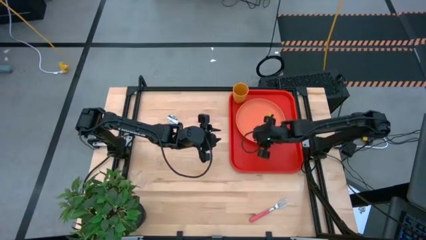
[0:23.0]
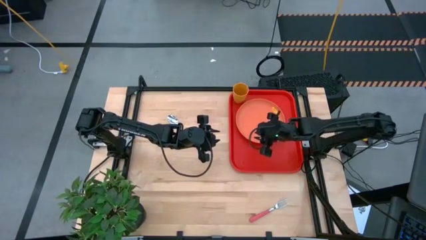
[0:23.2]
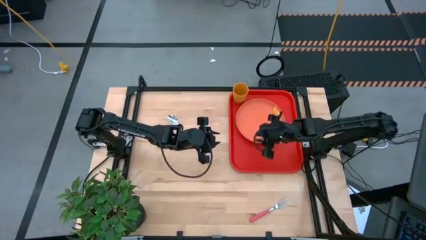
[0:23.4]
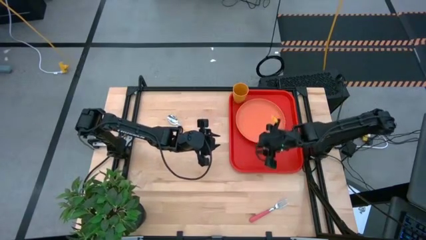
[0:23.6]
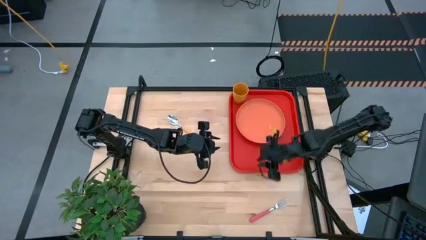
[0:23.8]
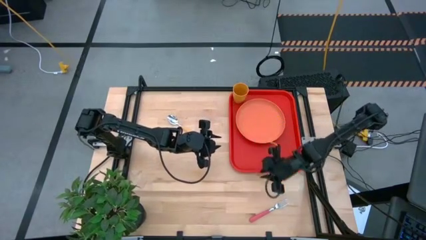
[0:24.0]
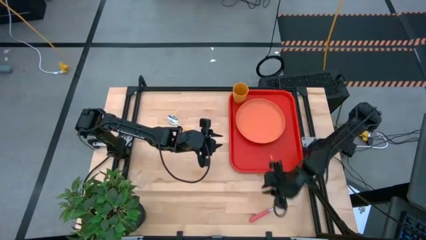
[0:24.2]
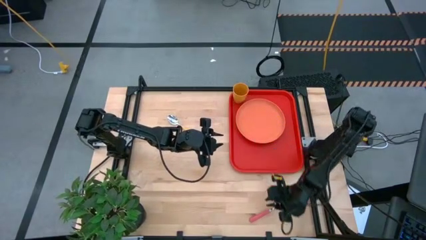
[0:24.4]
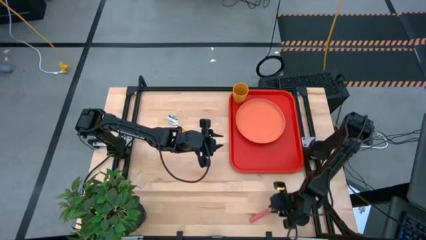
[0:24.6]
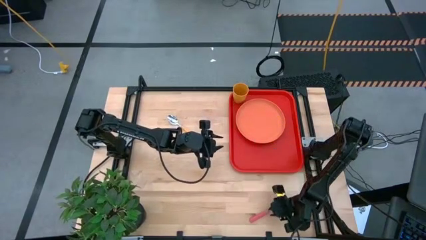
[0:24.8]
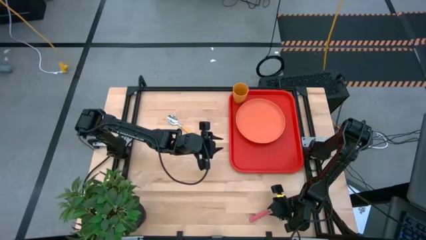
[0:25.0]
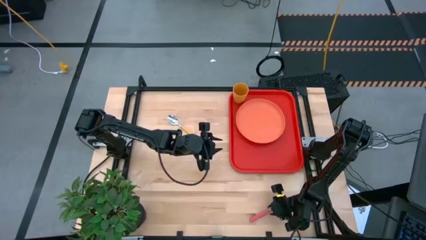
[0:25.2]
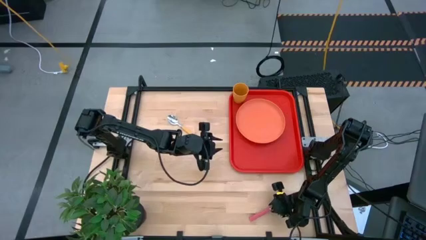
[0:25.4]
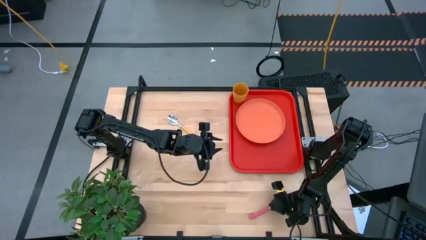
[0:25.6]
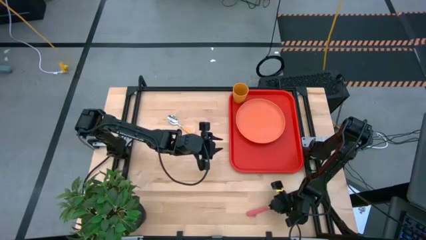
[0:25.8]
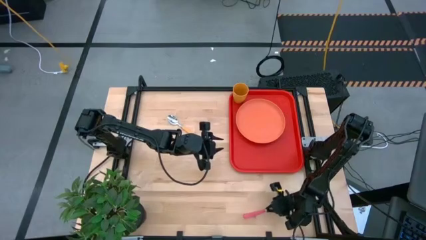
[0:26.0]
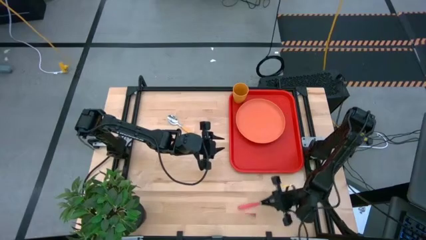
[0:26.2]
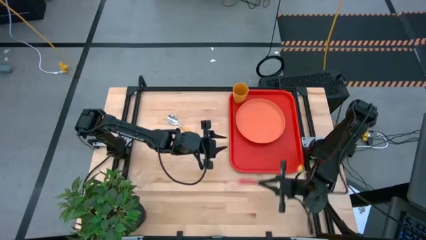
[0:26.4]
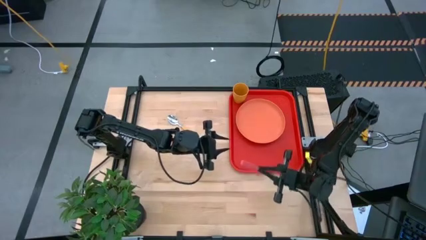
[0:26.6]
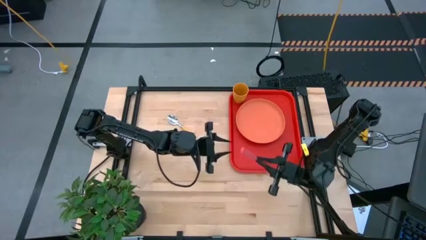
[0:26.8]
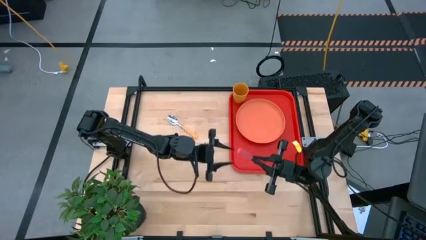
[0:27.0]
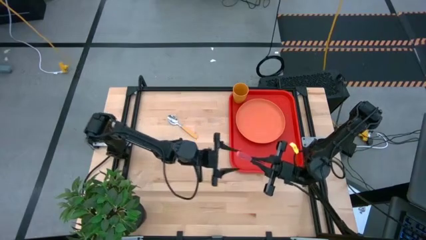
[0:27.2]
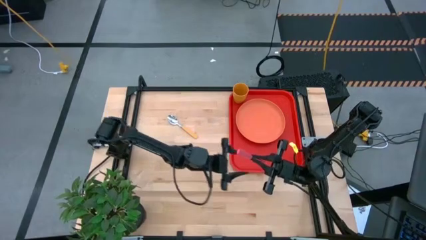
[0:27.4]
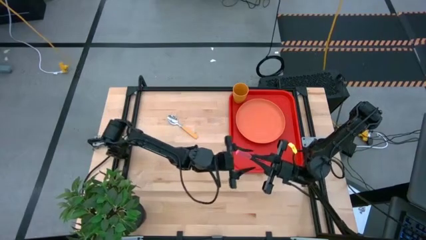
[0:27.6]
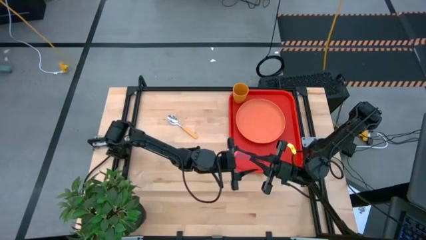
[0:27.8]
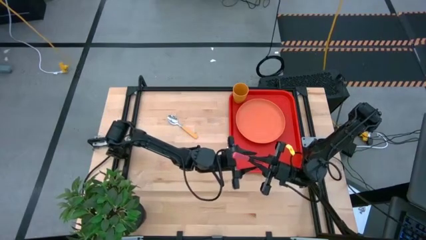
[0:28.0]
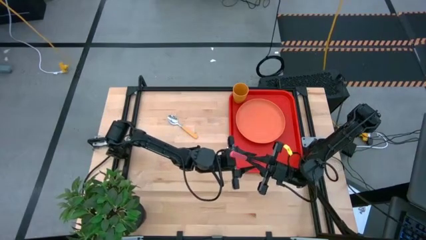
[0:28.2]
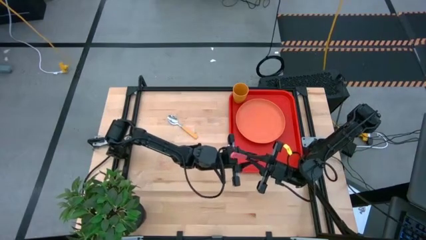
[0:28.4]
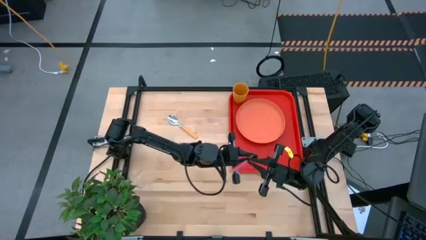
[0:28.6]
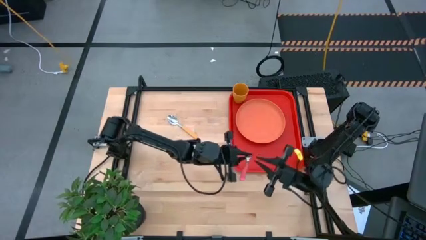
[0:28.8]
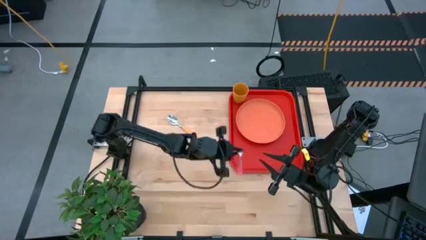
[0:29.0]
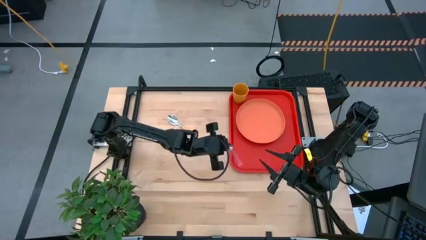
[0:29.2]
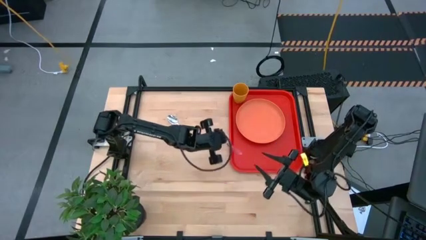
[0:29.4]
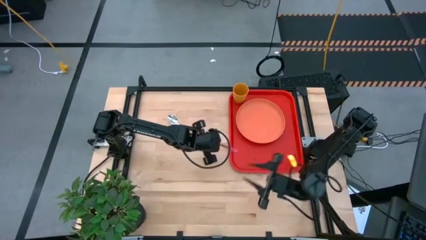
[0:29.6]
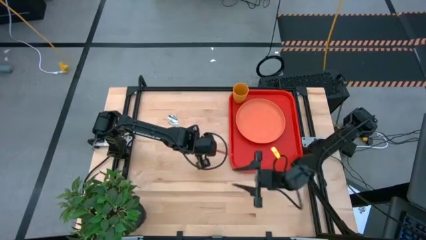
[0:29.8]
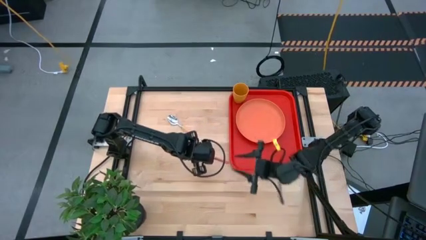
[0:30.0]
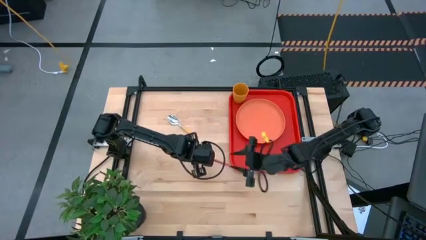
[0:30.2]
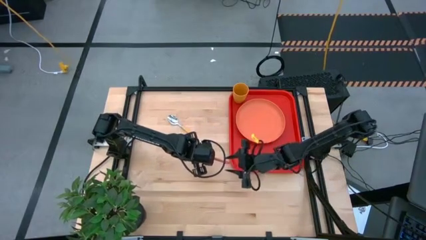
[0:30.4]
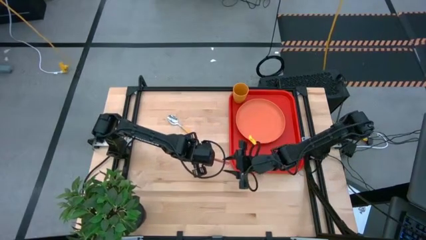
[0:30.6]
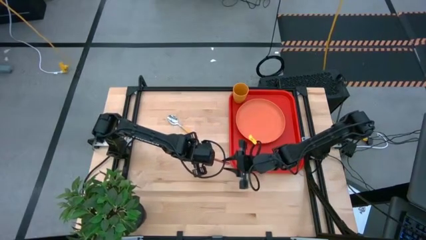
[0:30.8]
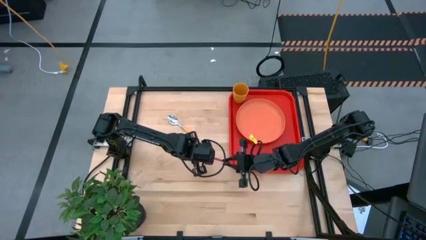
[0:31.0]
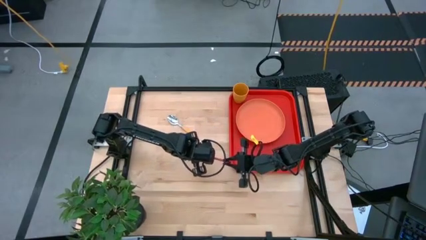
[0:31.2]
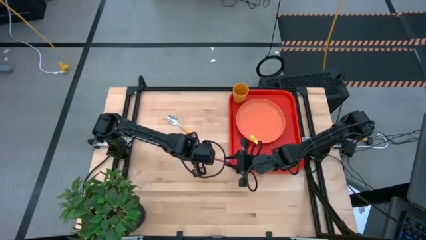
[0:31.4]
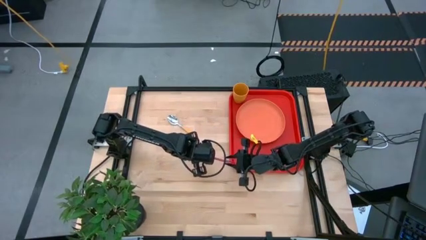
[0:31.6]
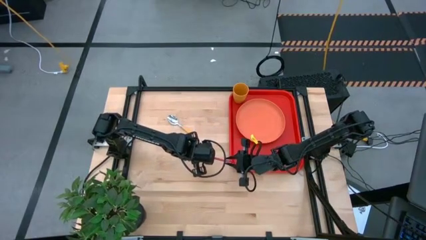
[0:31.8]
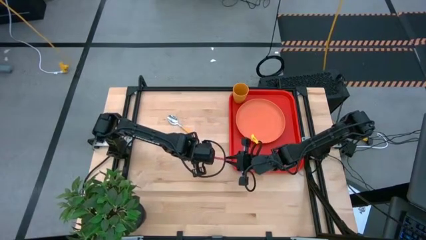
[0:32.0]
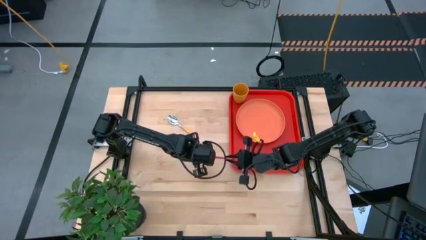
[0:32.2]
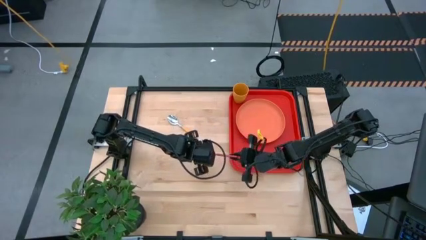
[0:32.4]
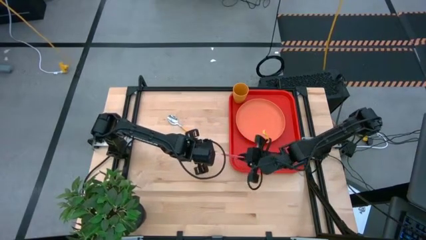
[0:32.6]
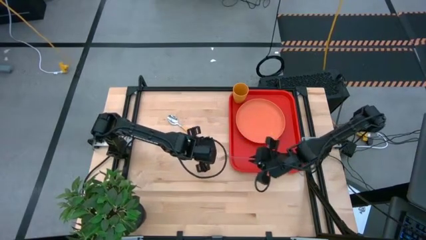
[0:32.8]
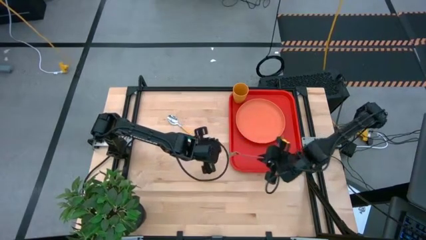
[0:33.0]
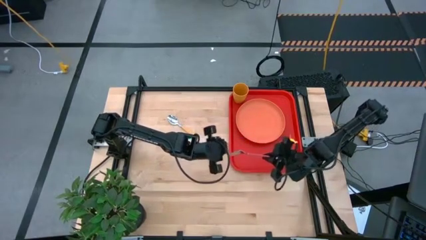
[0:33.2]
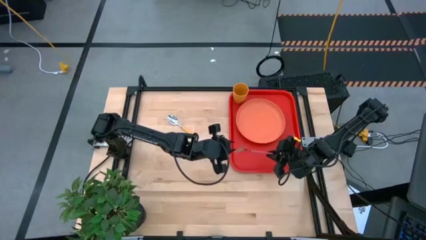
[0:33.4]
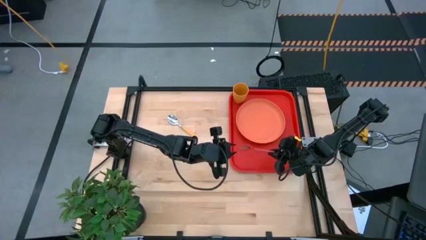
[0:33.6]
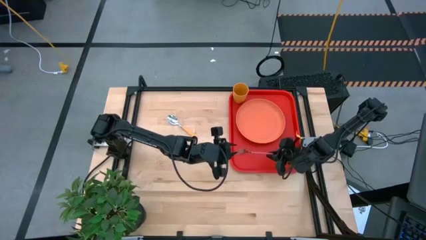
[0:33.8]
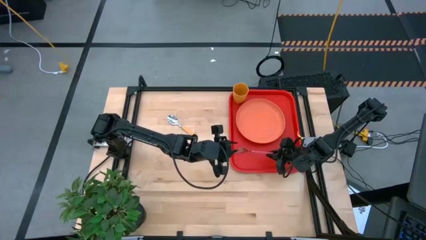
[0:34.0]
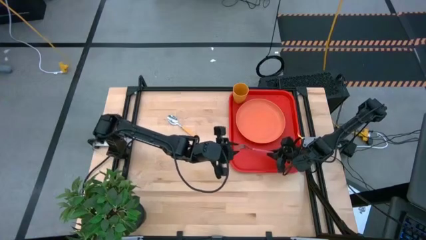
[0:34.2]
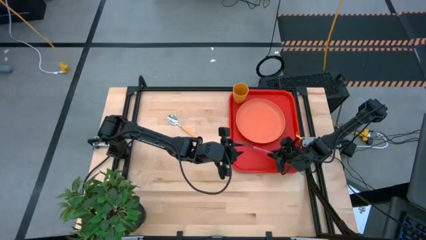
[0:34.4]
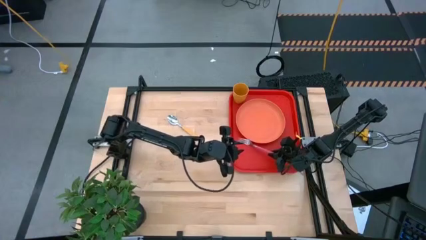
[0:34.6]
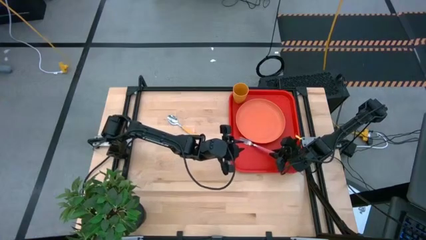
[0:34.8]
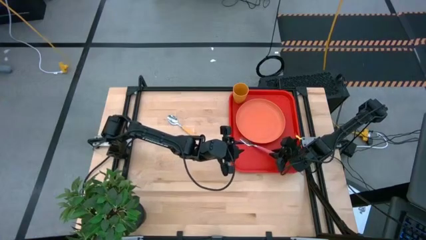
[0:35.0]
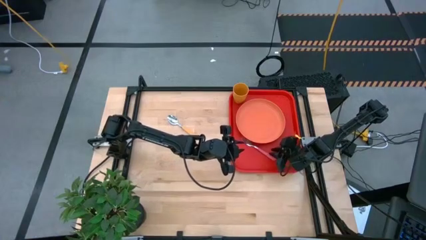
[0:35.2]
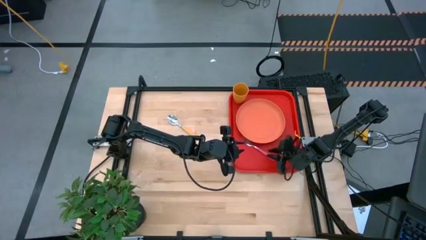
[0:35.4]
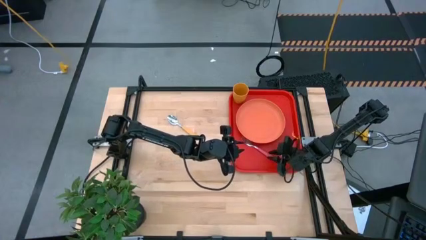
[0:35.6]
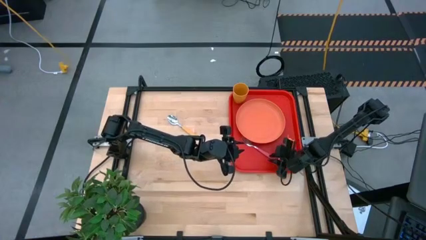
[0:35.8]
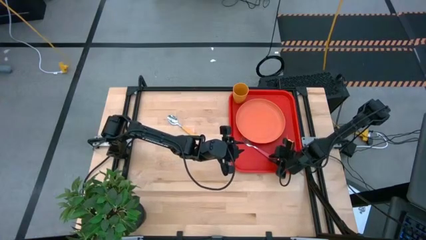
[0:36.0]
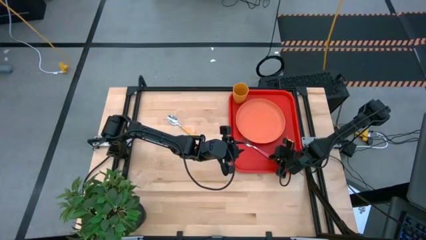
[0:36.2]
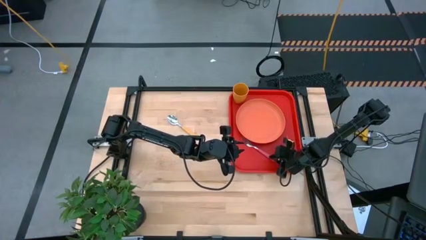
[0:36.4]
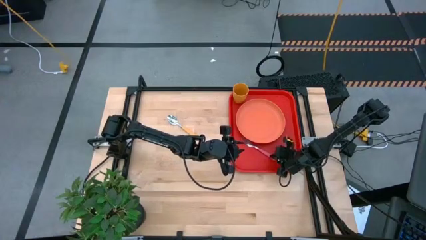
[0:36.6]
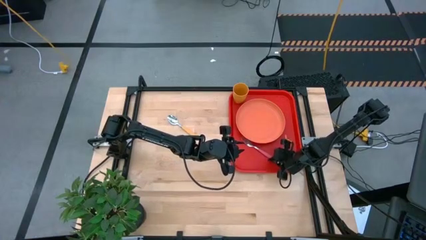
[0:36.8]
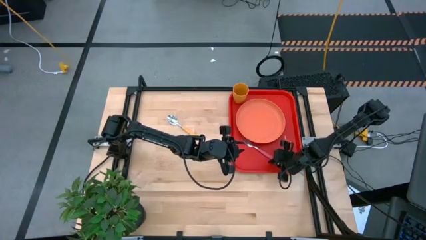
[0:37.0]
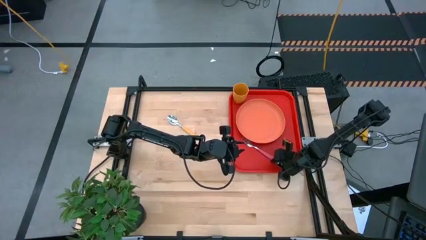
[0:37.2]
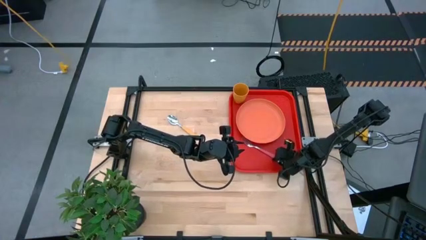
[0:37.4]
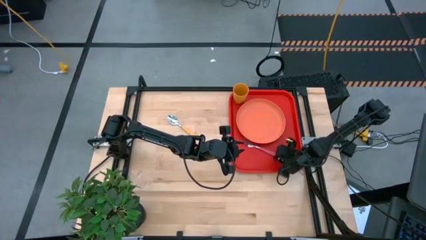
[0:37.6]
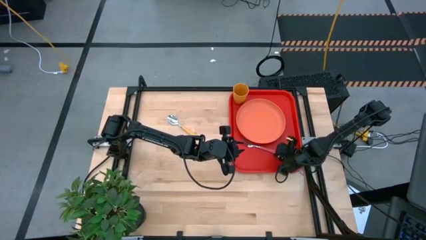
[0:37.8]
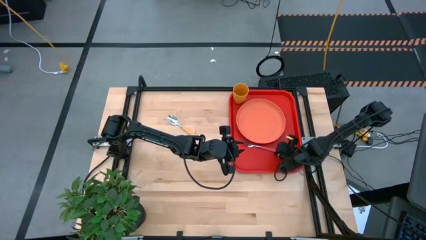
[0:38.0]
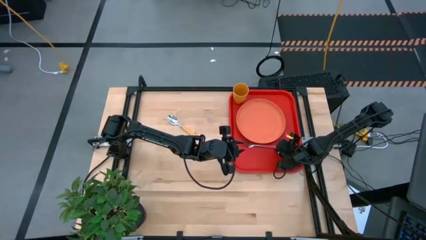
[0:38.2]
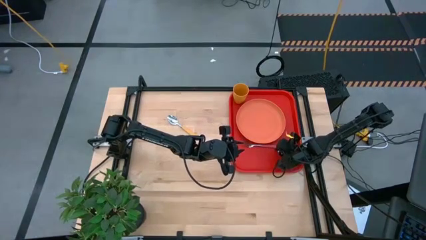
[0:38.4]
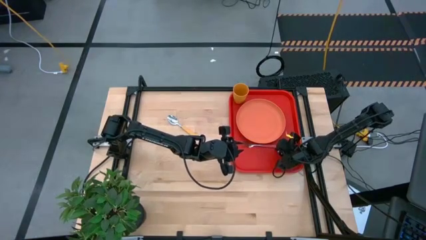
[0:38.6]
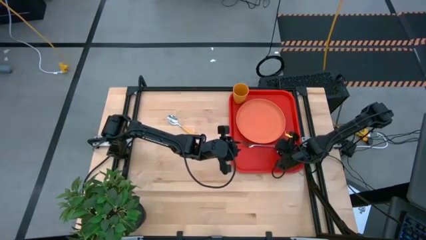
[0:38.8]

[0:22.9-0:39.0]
Task: Pick and place plate/cup/fork/spoon on tray
Put the pink fork on the red table tray to the bottom of the orange plate

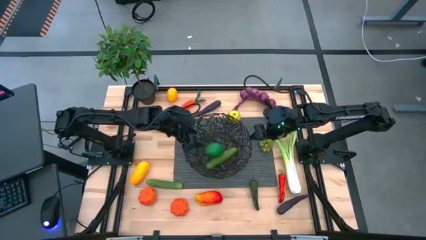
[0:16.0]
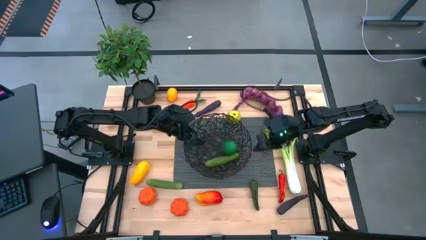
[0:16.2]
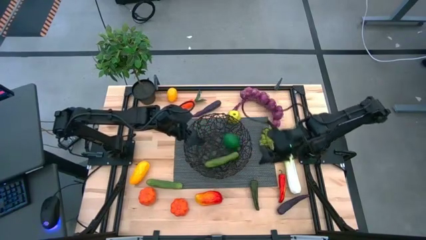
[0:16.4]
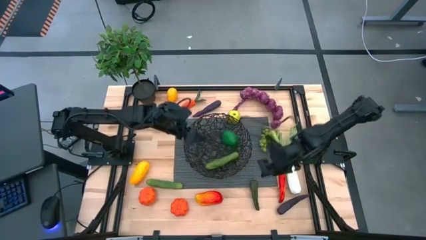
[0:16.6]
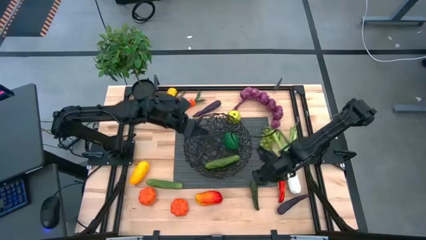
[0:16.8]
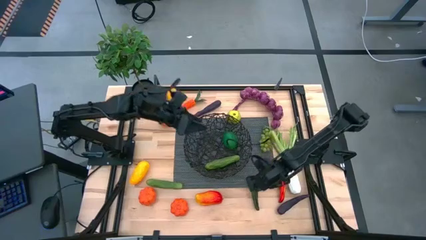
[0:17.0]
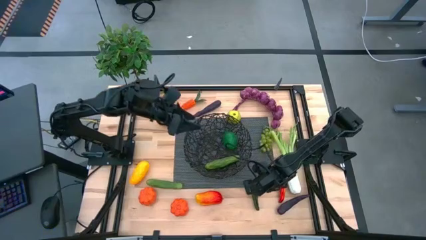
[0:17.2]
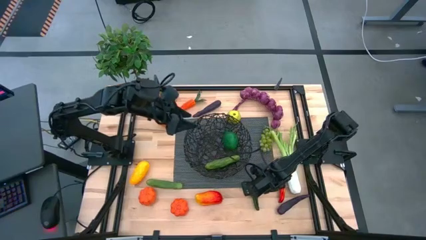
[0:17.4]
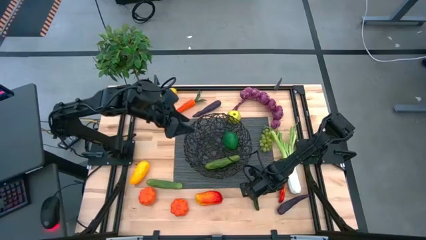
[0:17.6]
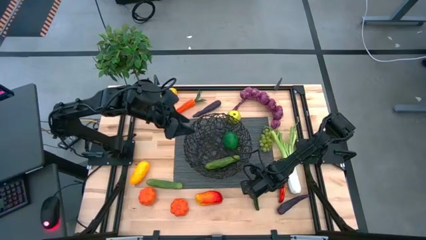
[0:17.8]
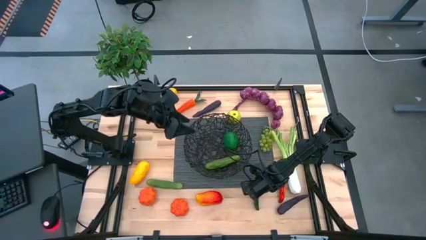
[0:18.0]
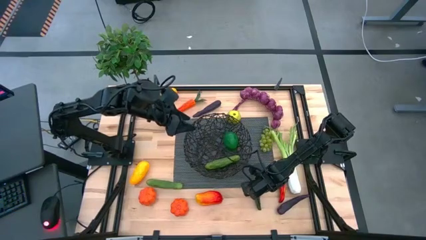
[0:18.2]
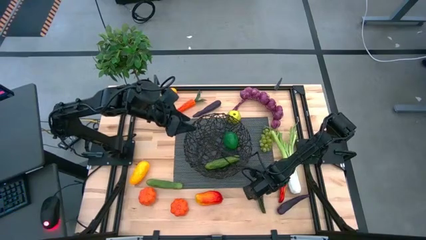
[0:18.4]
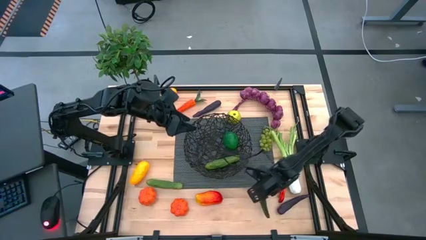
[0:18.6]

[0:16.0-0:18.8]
Task: Build produce basket
Put the green chili pepper into the black basket
